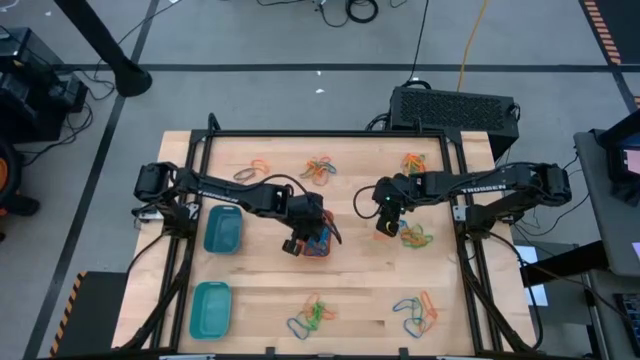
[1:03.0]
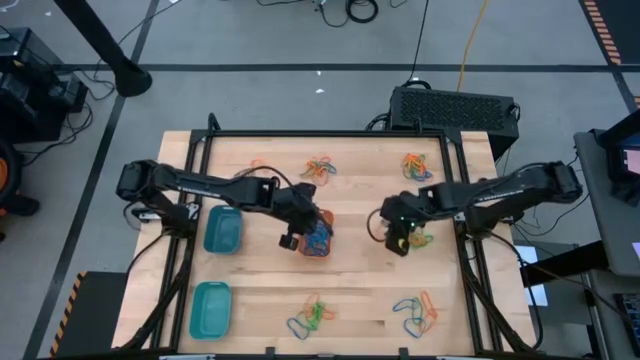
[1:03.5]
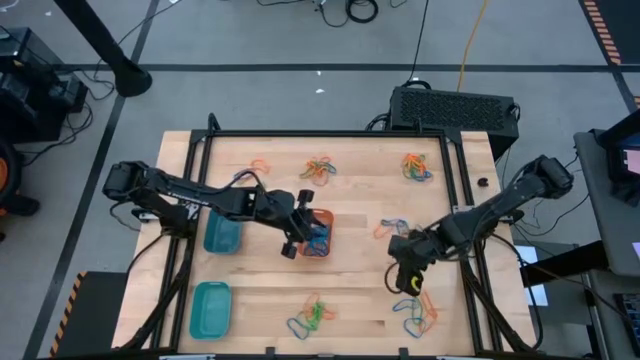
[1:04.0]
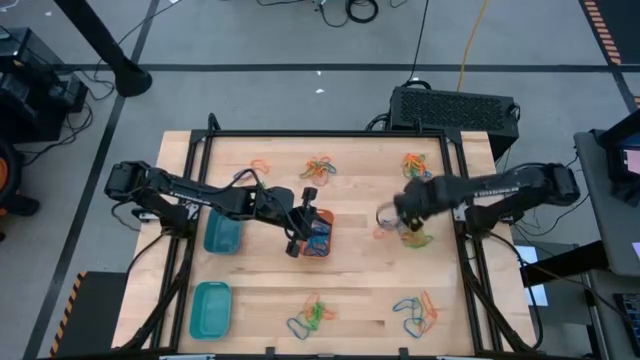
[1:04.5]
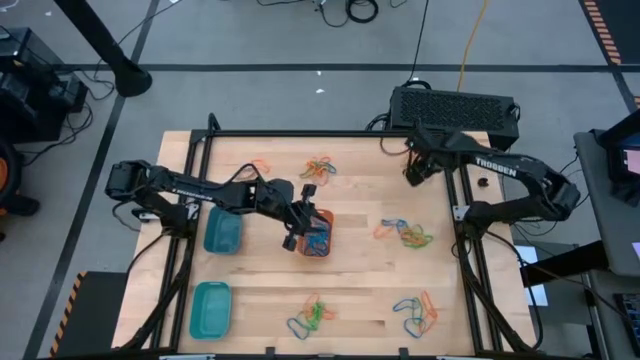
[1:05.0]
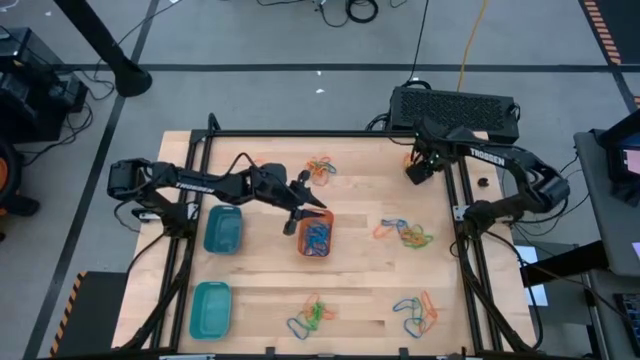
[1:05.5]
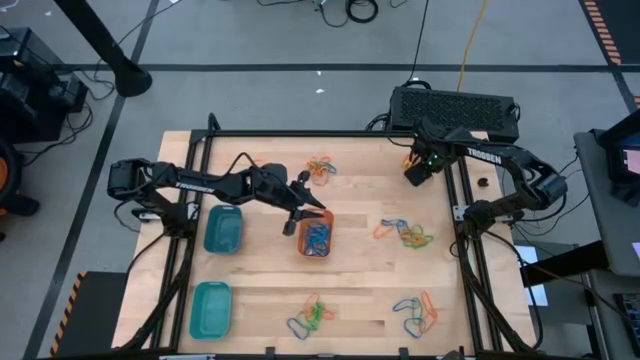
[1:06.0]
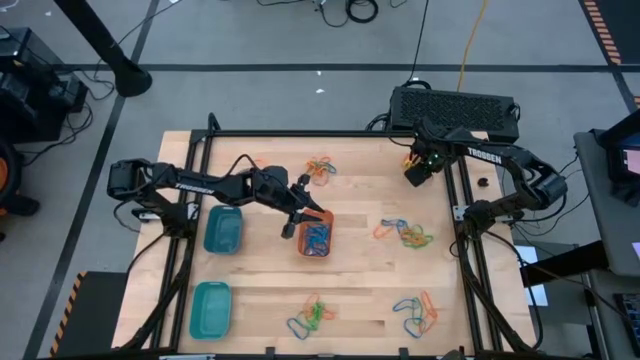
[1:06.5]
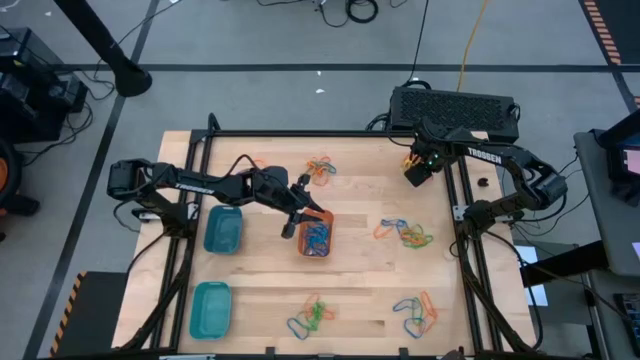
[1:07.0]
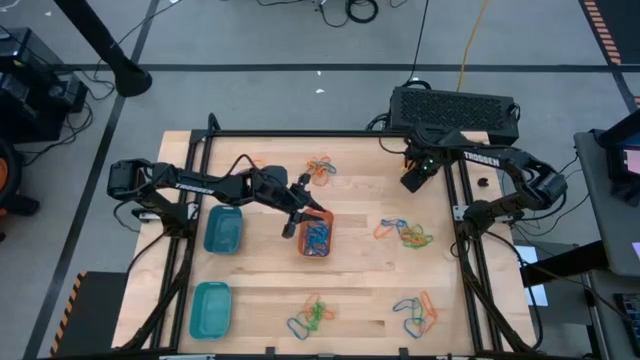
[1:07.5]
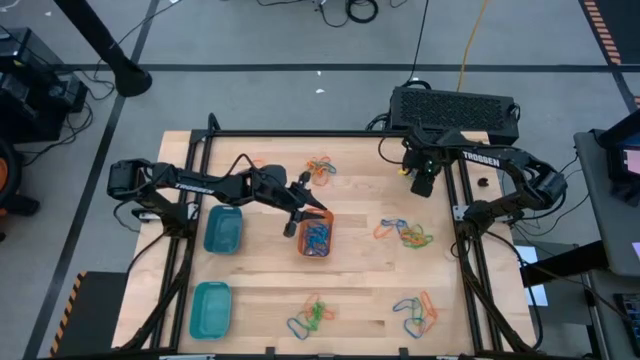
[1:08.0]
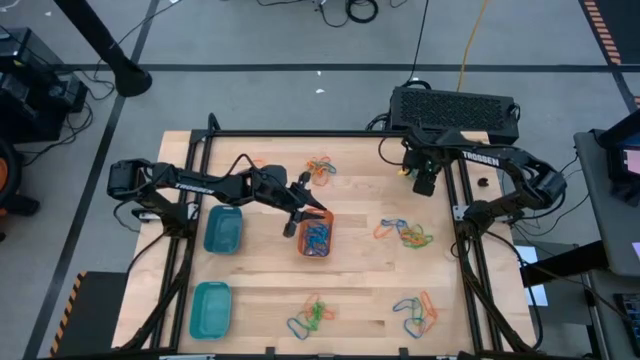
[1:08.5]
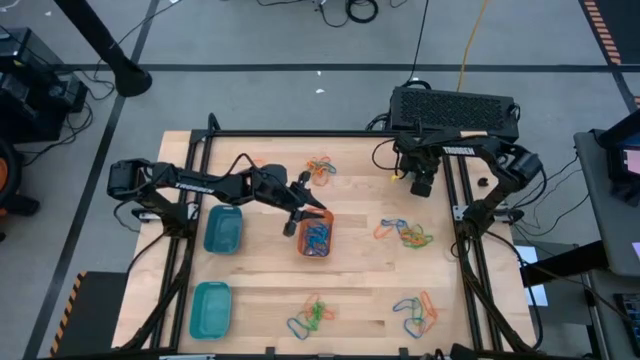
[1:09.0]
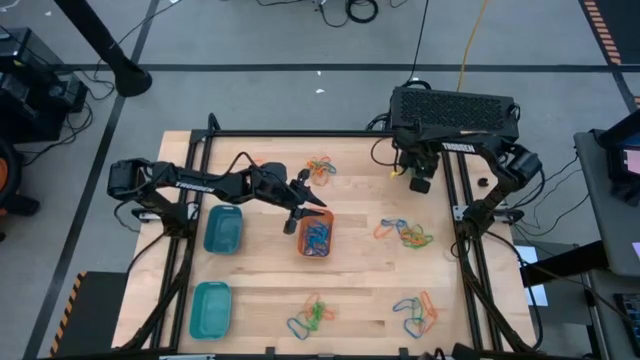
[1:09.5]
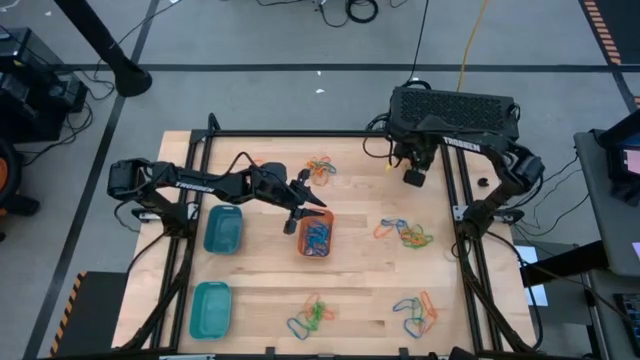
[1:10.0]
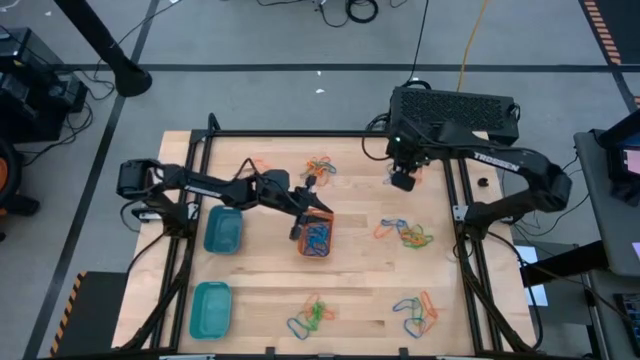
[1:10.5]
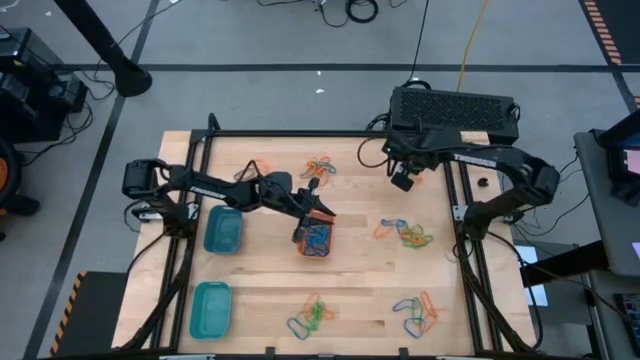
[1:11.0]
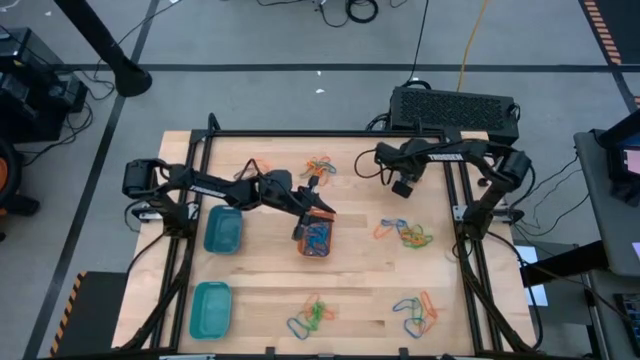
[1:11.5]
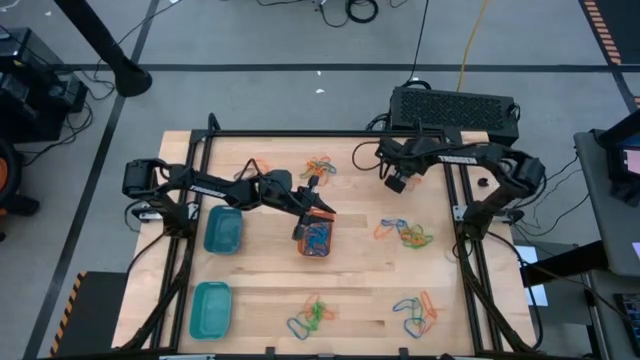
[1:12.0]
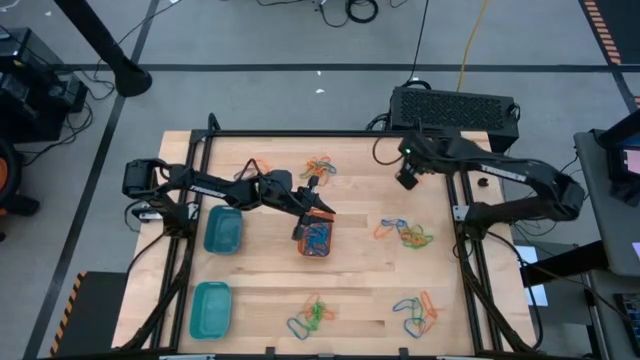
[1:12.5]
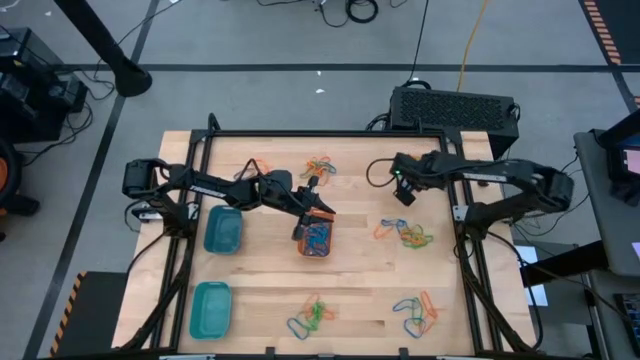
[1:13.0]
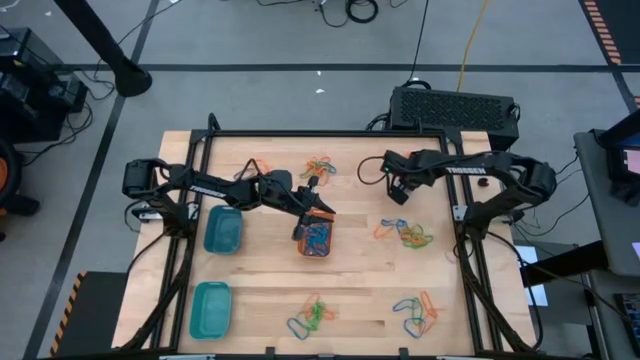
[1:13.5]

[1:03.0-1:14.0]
Task: Sort rubber bands into baskets
Put the blue rubber band into the orange bin

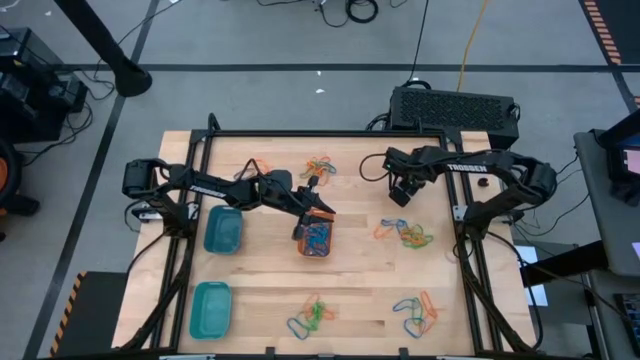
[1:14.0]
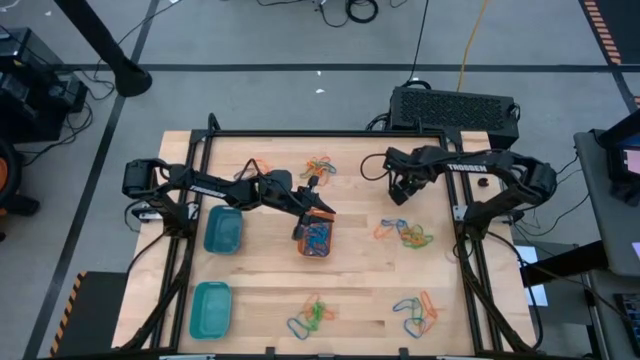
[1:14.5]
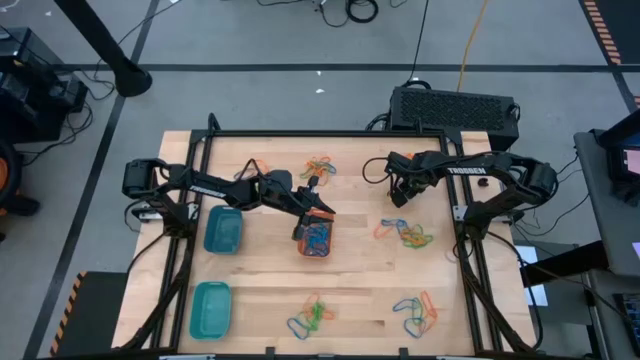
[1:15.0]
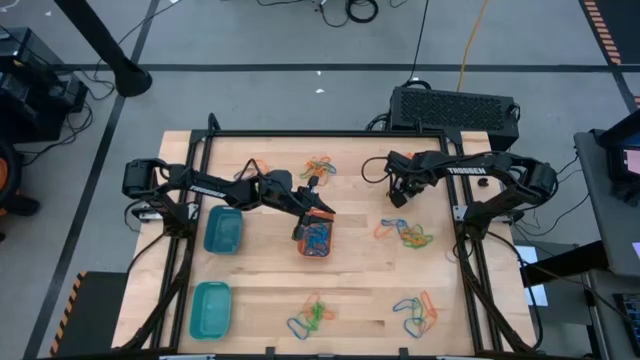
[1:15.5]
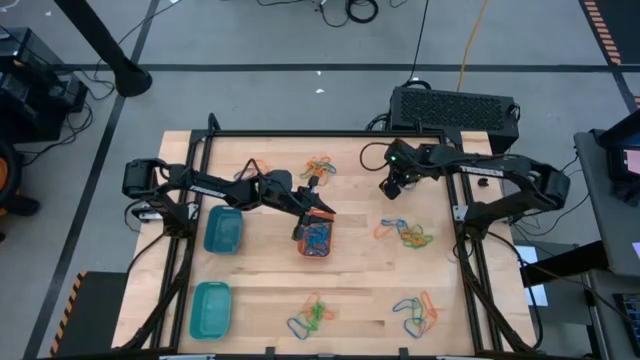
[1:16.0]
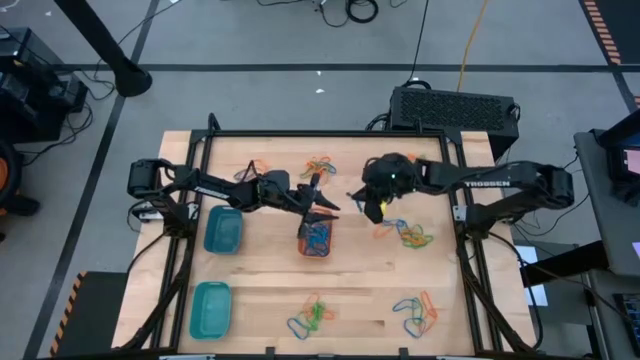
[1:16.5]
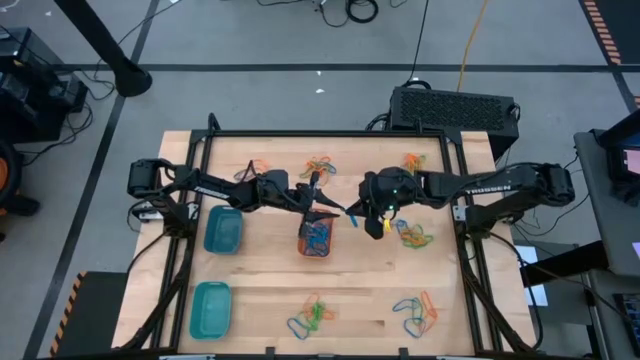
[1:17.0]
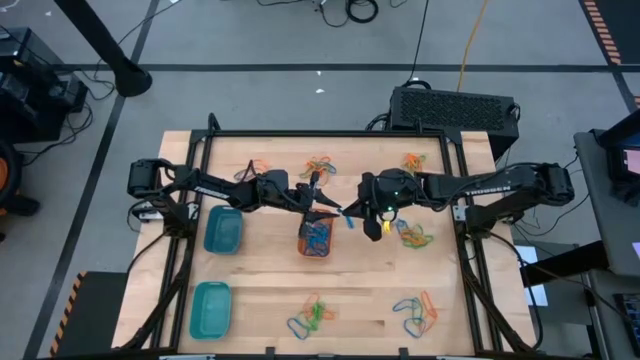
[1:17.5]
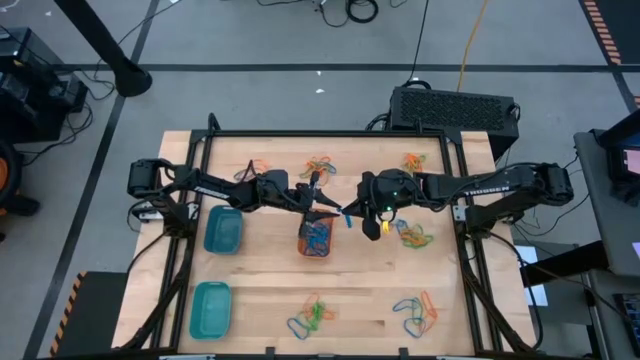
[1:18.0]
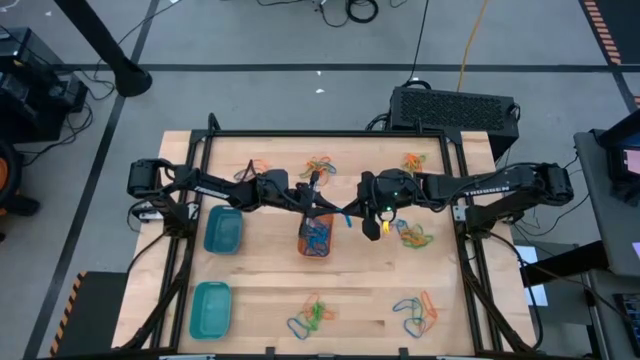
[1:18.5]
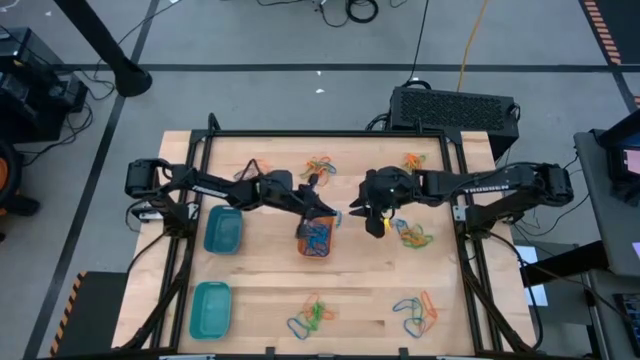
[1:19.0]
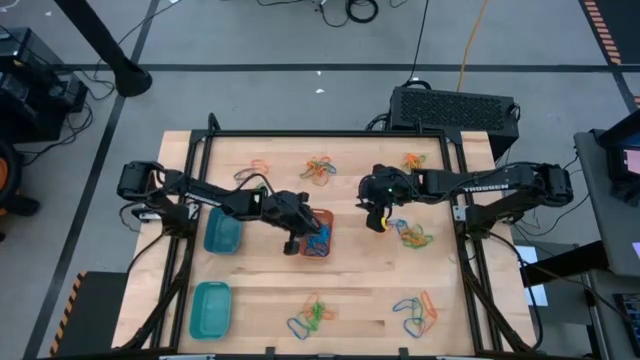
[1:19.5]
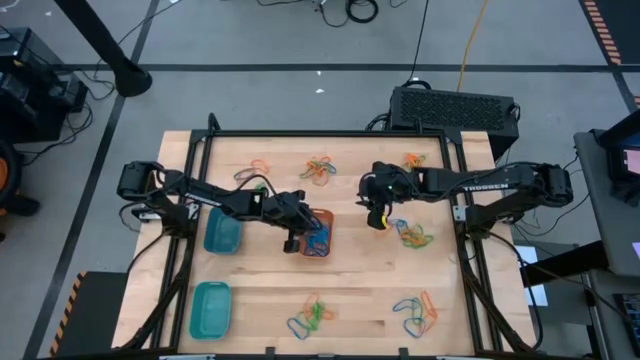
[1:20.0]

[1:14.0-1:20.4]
Put the blue rubber band into the orange bin

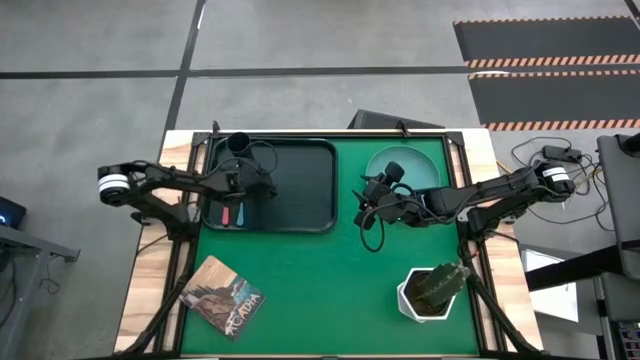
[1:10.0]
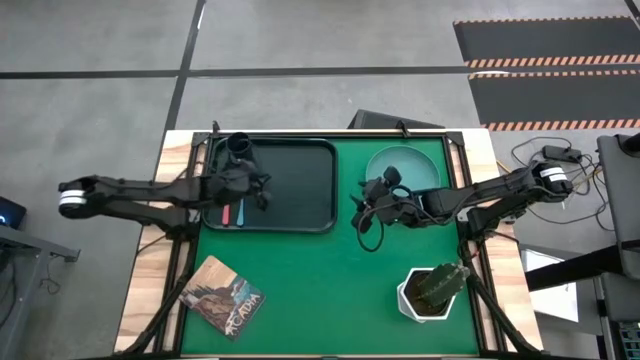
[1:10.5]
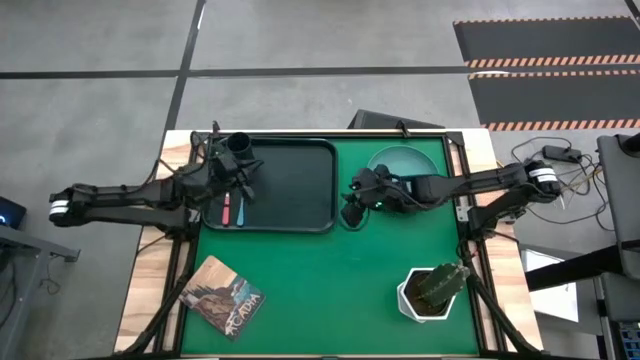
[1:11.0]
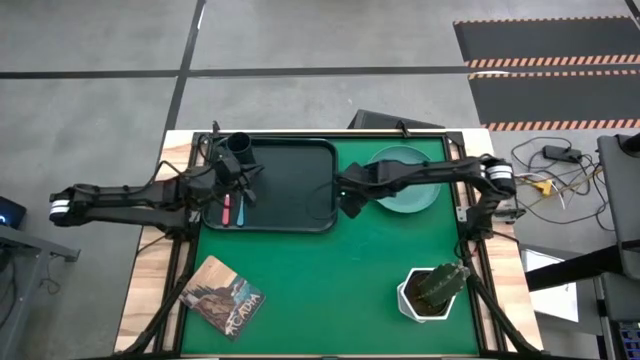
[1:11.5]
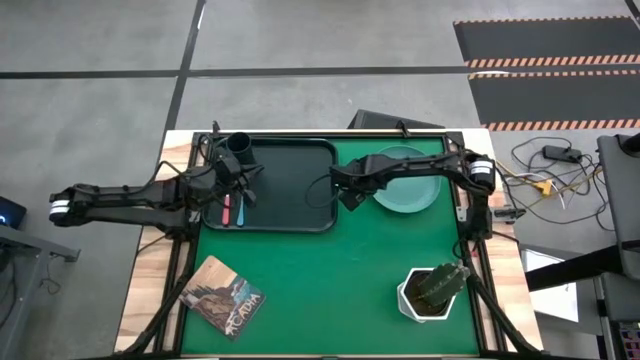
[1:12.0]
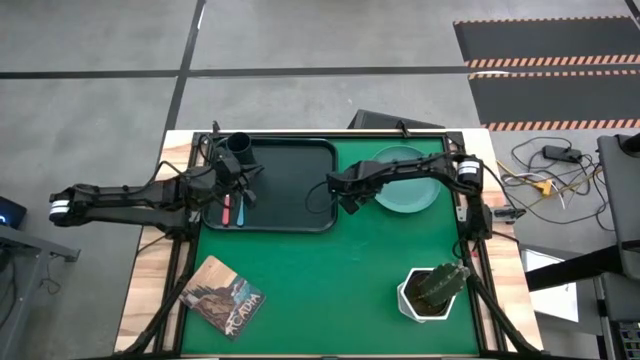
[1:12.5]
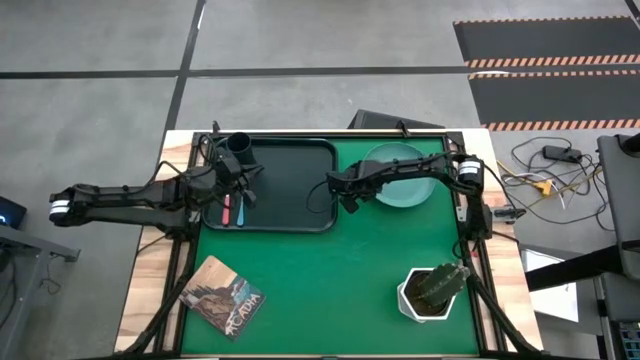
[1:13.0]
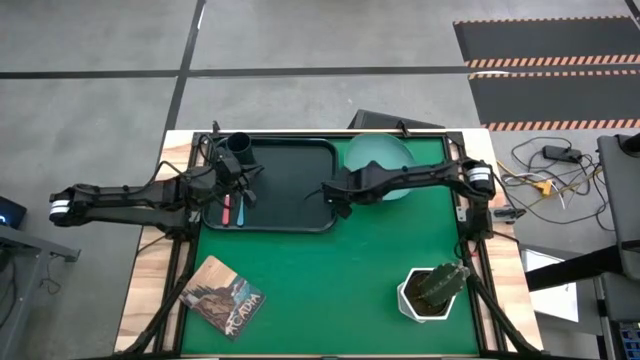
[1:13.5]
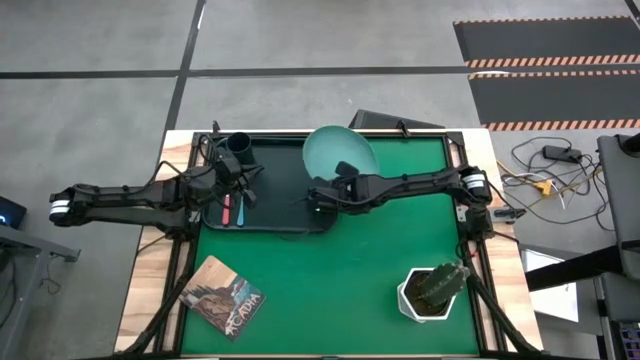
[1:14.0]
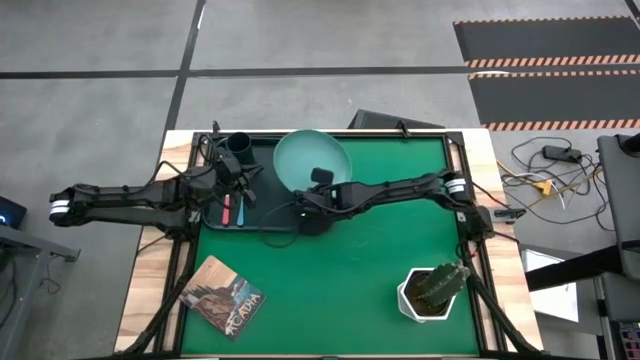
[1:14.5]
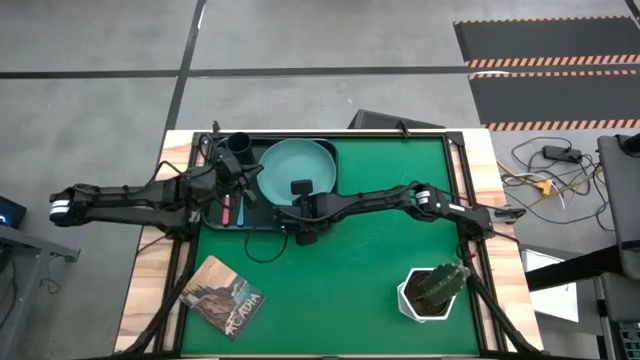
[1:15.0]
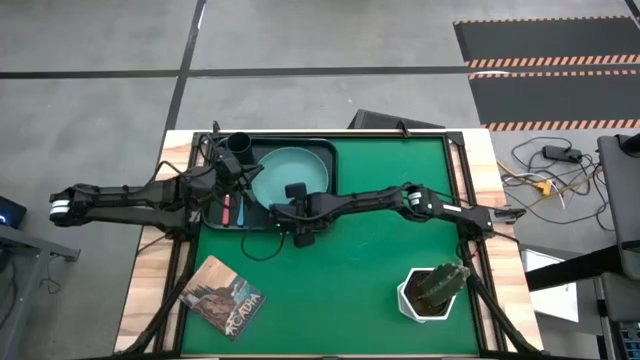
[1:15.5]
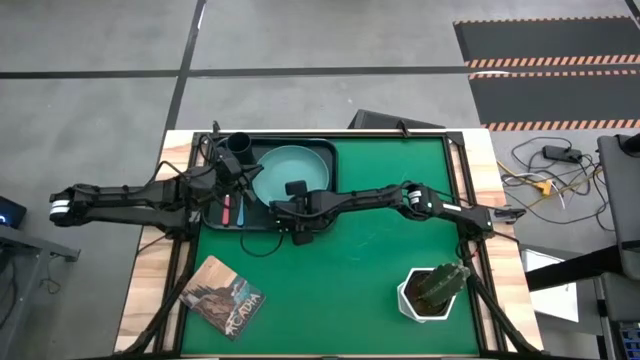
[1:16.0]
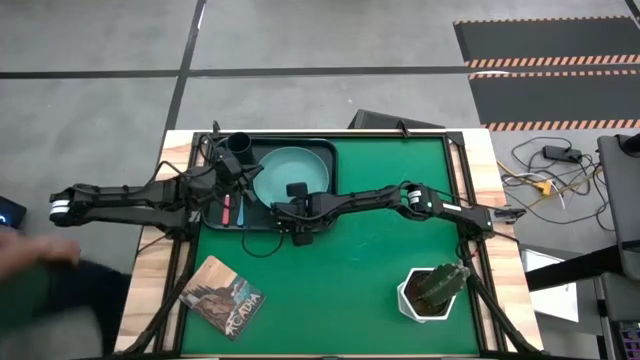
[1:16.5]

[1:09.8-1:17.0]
Task: Pick and place plate/cup/fork/spoon on tray
Put the green plate on the black serving tray to the right of the blue spoon
